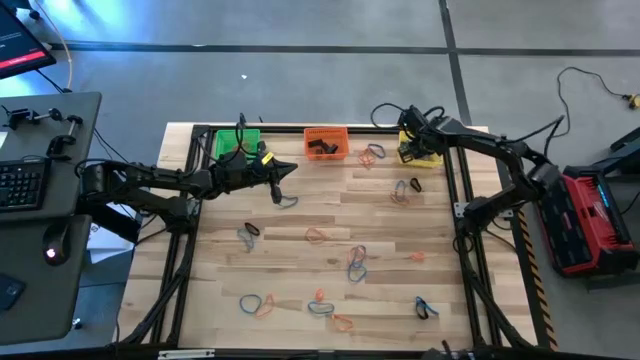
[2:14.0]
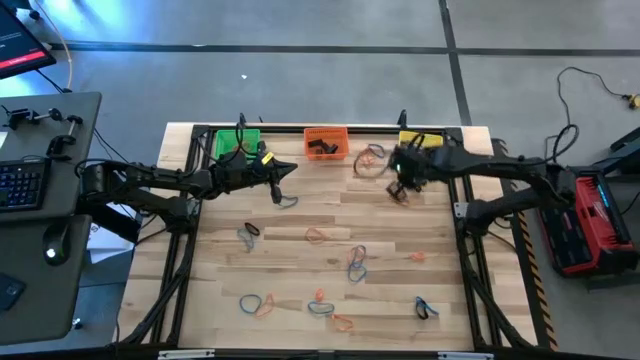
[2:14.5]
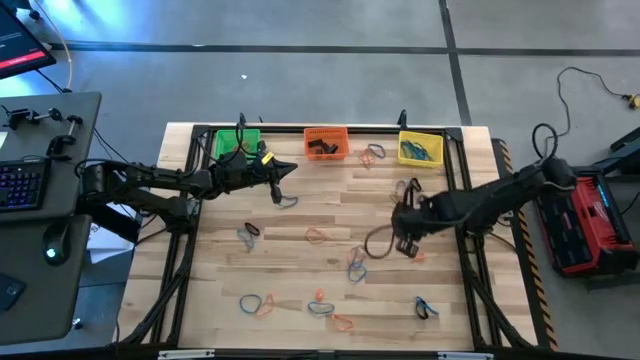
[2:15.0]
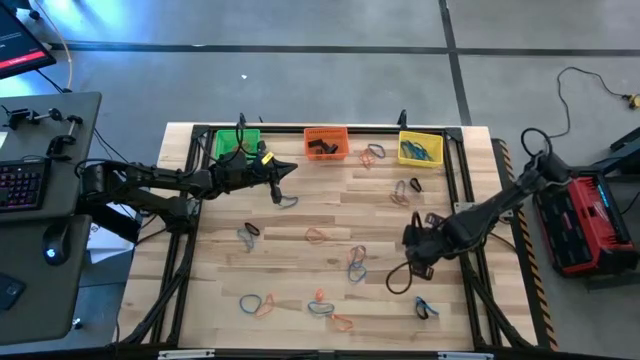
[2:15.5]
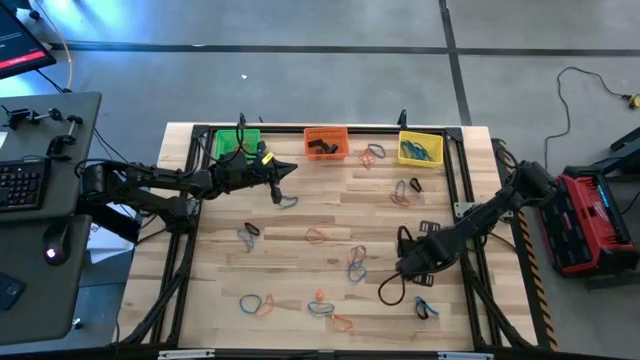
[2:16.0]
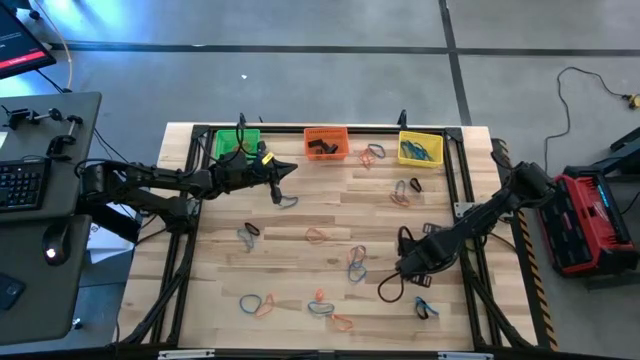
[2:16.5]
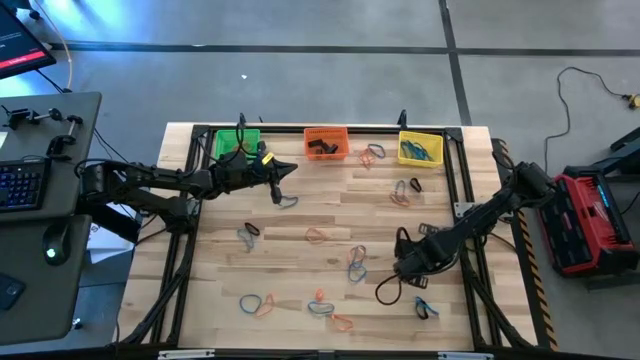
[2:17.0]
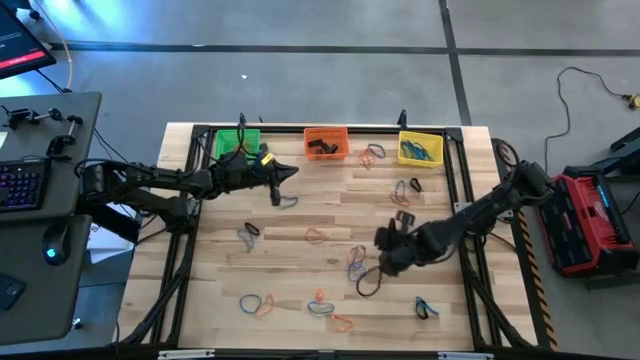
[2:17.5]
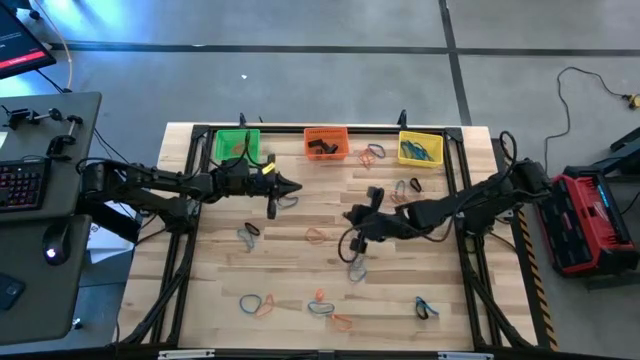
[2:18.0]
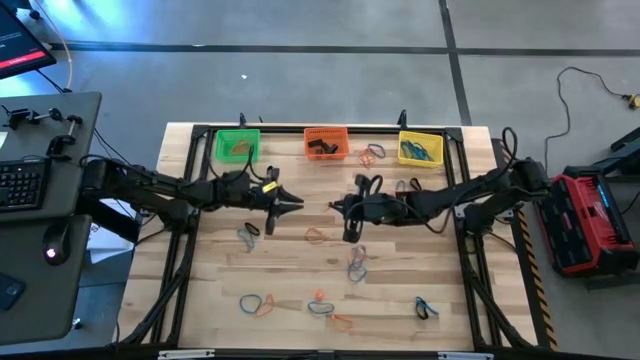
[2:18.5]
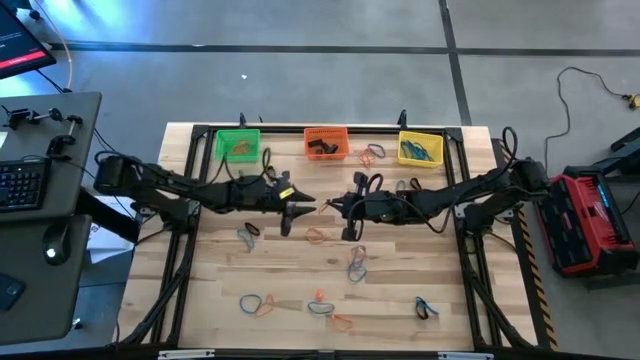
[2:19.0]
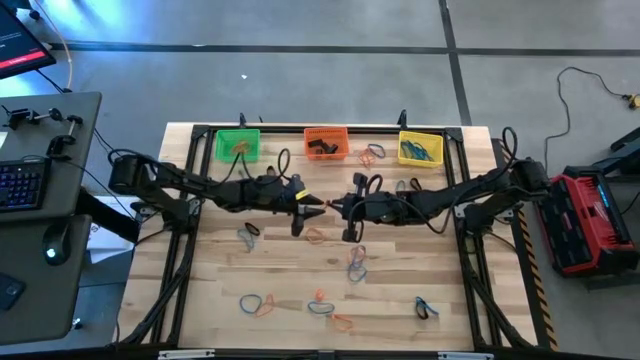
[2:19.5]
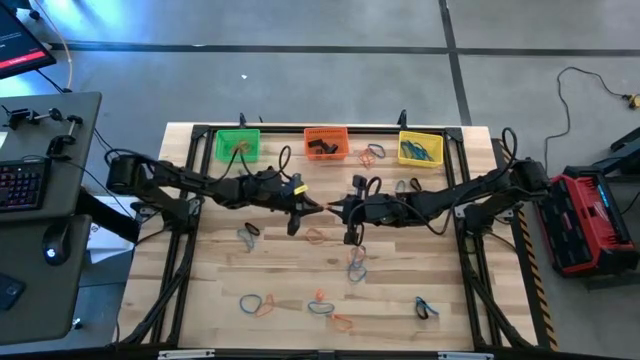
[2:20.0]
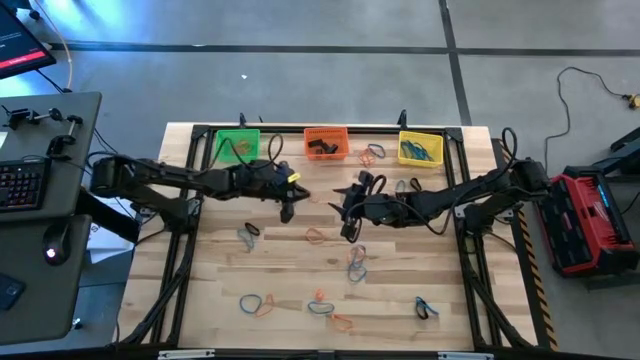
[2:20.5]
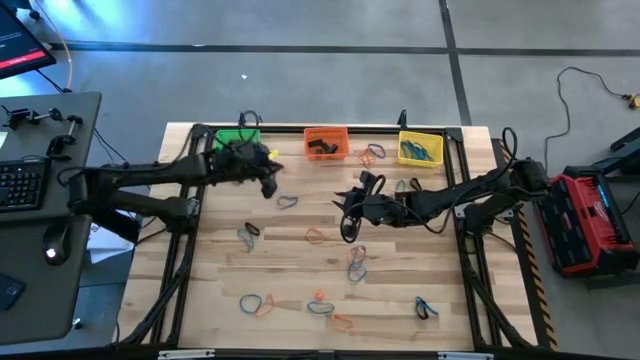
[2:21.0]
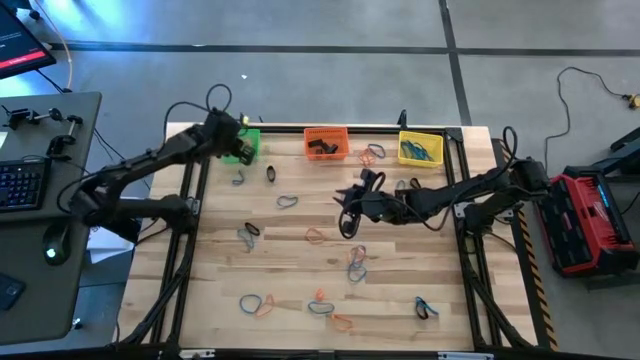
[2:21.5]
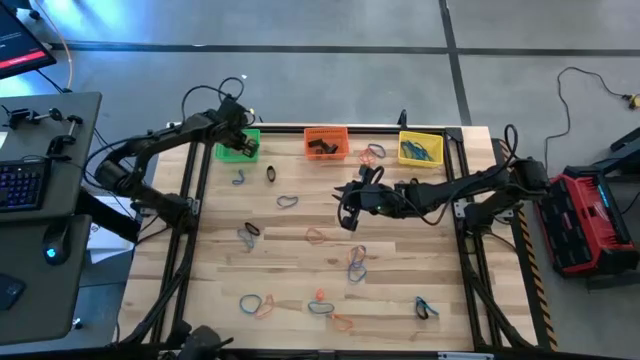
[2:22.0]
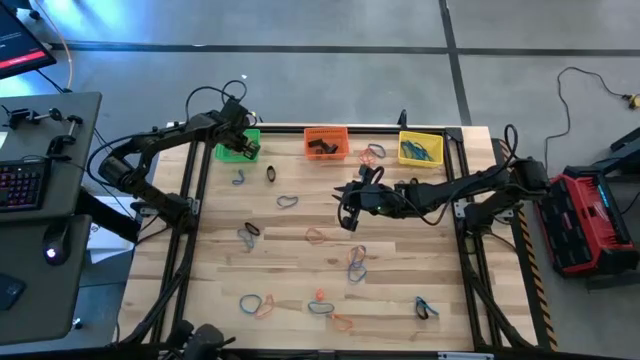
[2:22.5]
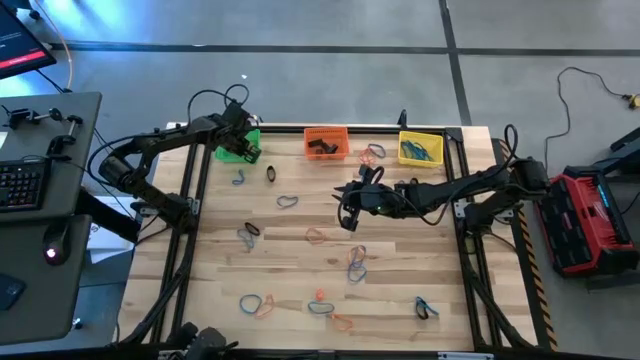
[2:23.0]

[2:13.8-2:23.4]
Task: Sort rubber bands into baskets
Put the orange rubber band into the green bin

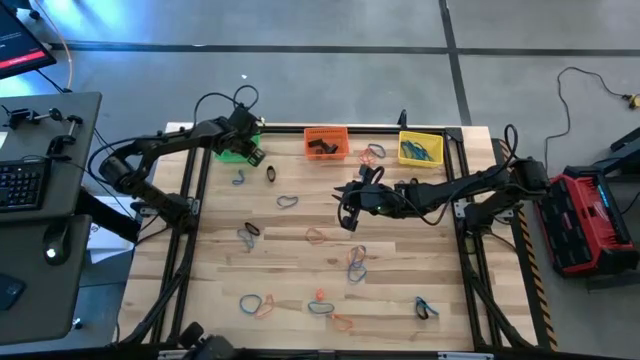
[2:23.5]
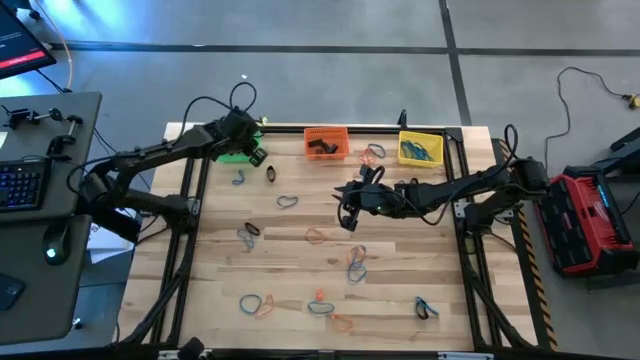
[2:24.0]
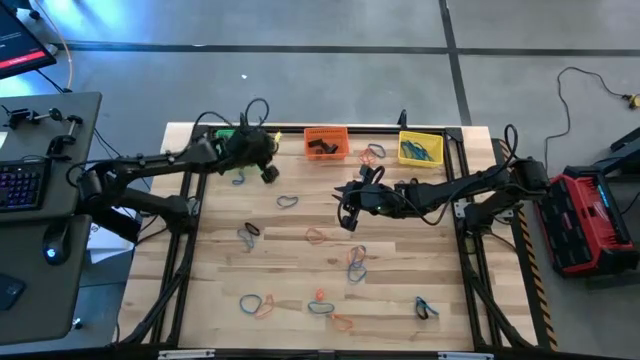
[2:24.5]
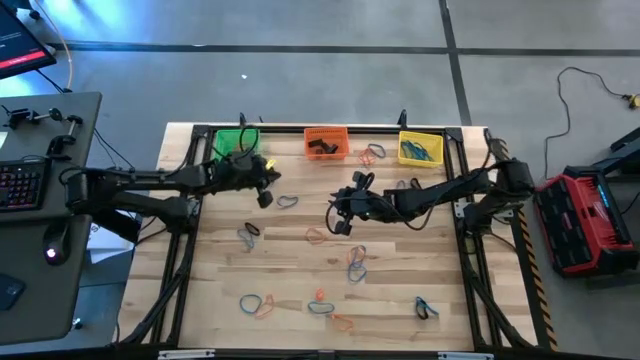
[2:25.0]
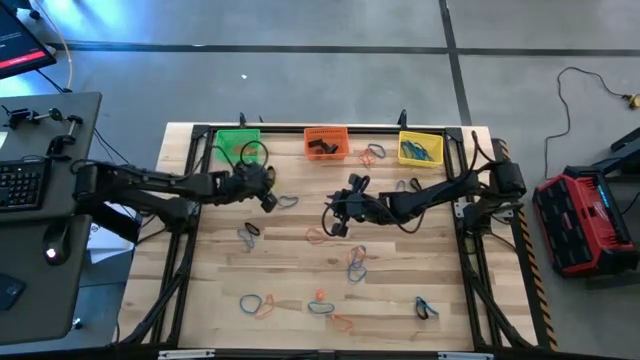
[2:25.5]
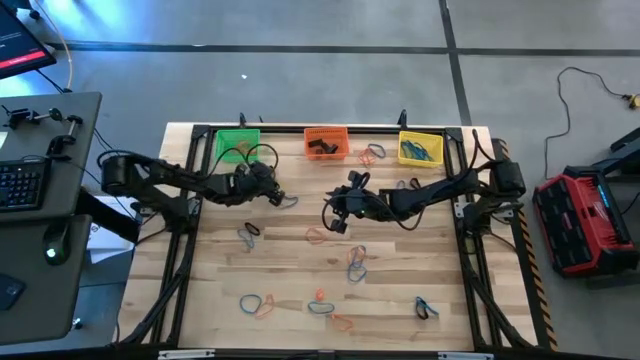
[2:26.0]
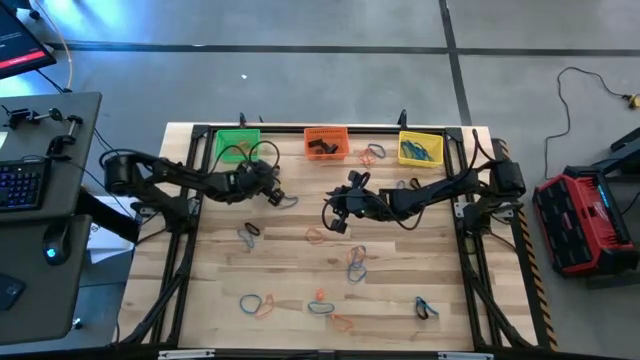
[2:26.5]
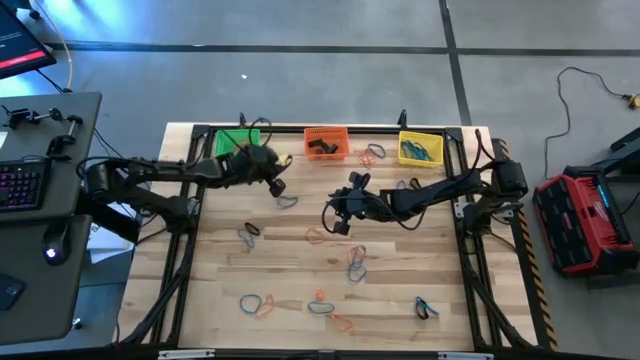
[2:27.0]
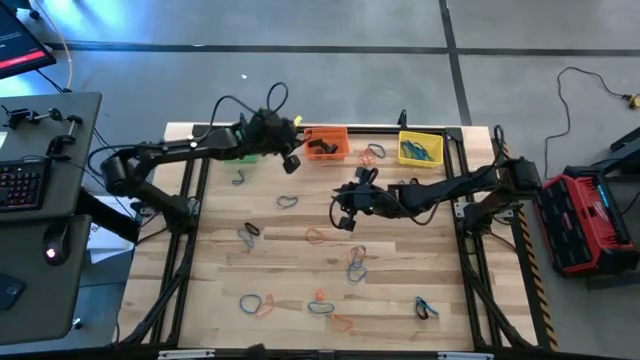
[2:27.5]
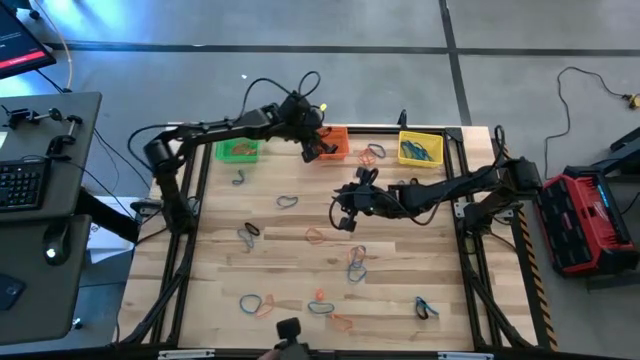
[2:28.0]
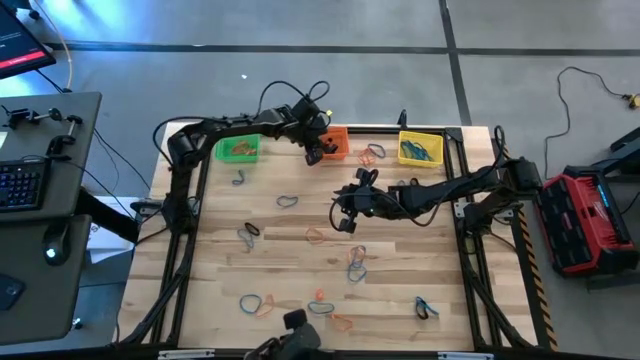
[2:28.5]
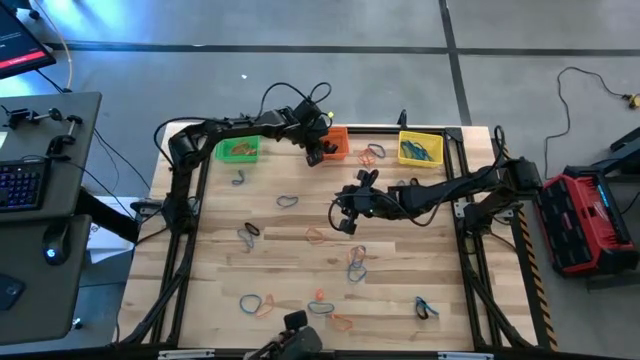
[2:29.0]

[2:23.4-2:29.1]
Put the black rubber band into the orange bin

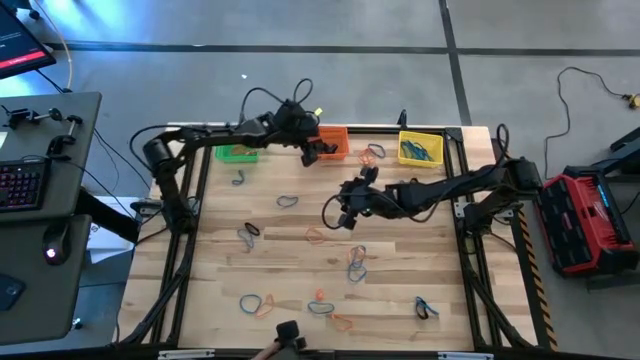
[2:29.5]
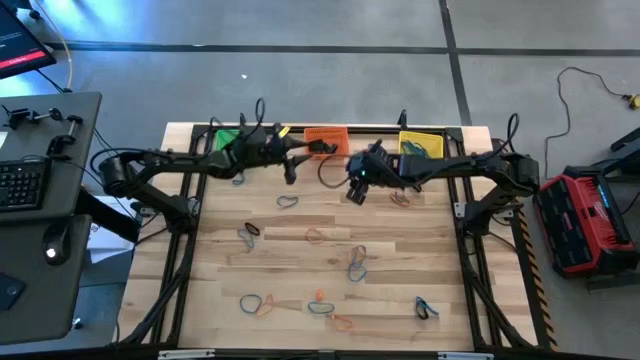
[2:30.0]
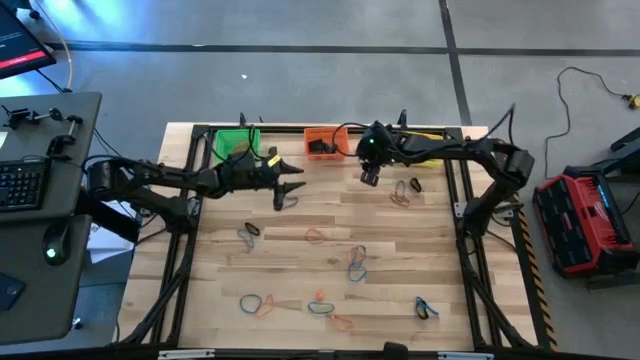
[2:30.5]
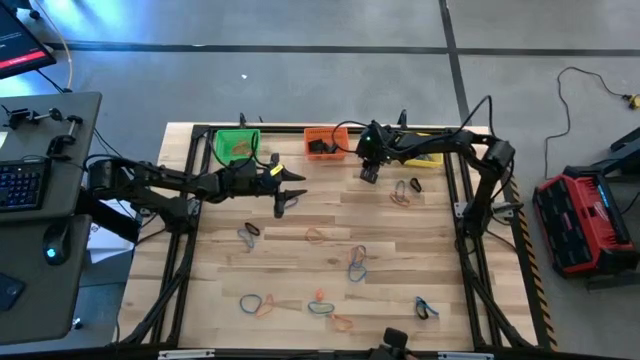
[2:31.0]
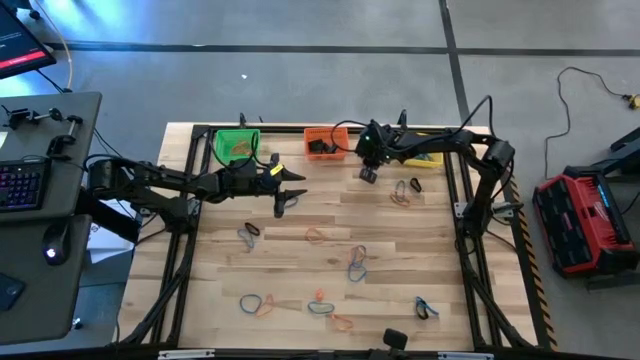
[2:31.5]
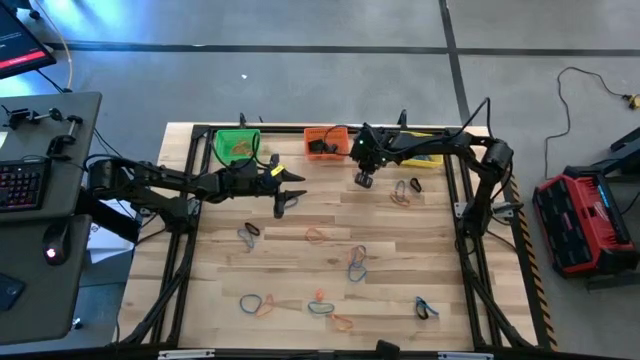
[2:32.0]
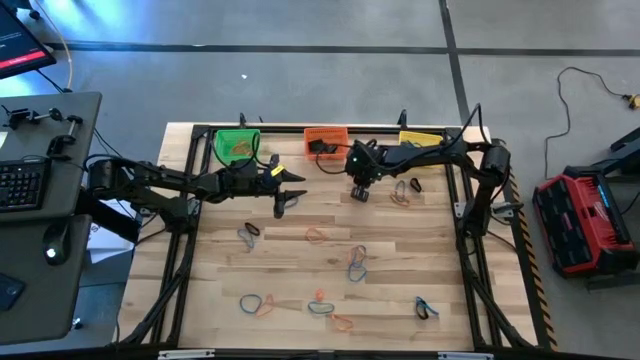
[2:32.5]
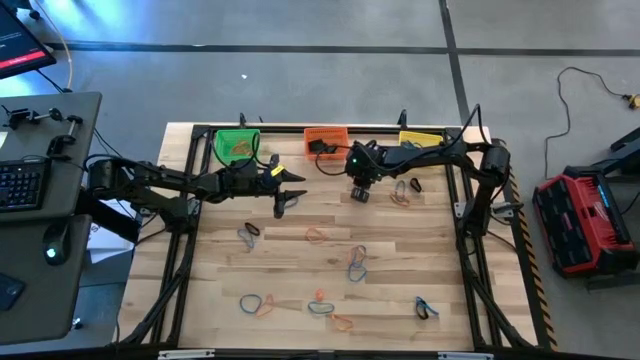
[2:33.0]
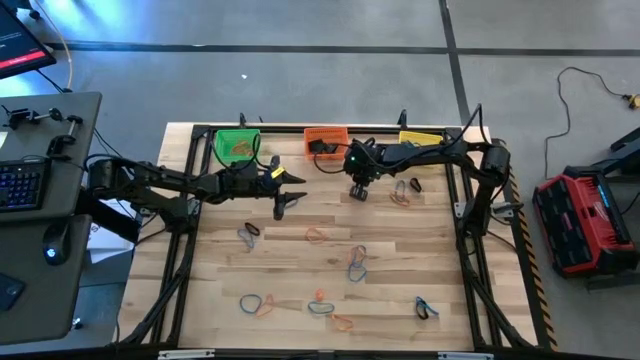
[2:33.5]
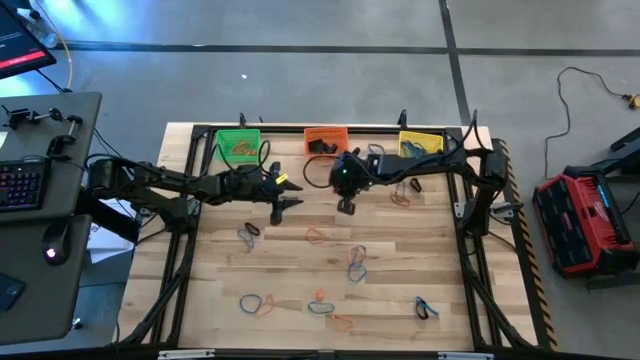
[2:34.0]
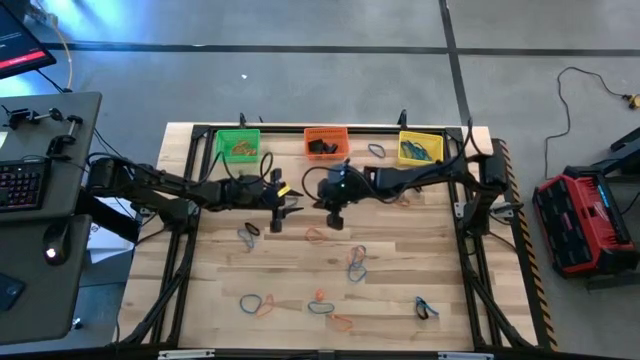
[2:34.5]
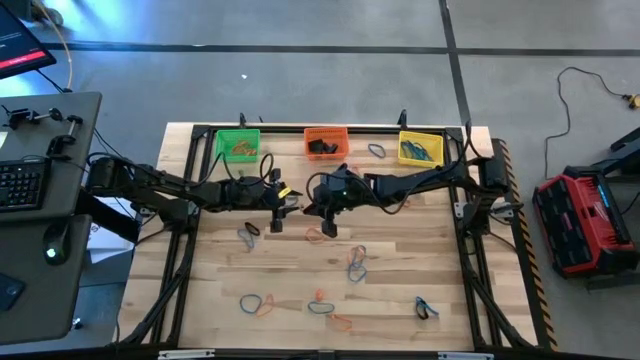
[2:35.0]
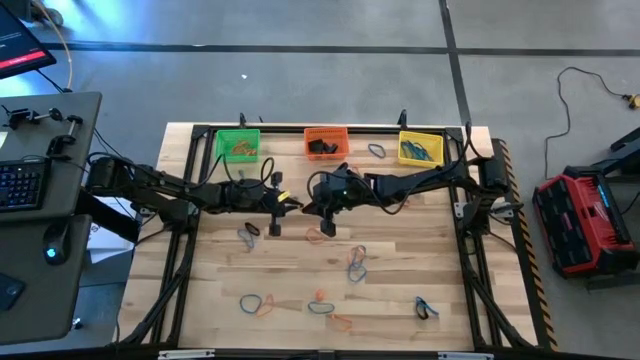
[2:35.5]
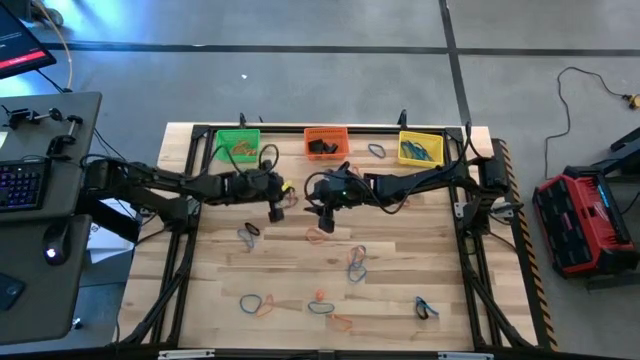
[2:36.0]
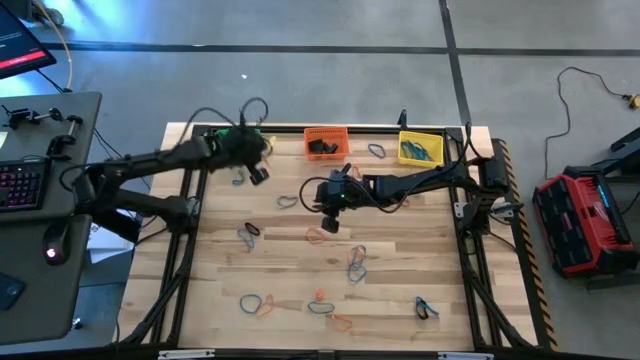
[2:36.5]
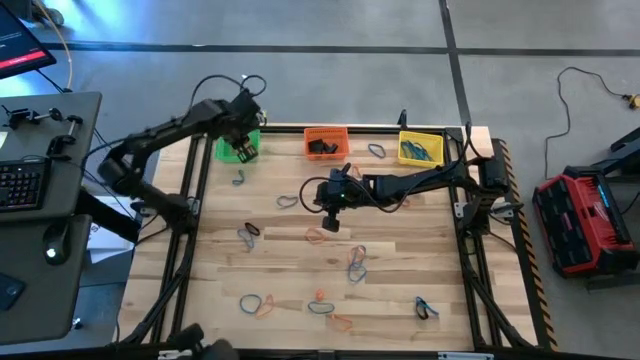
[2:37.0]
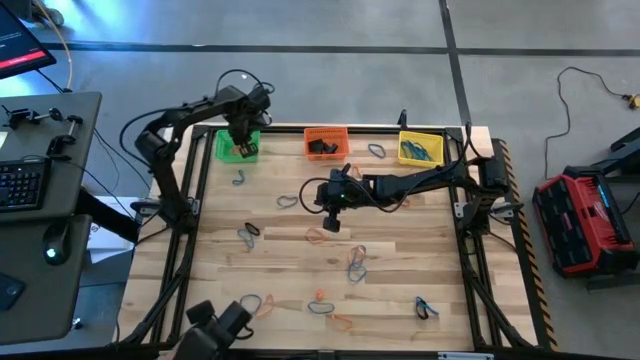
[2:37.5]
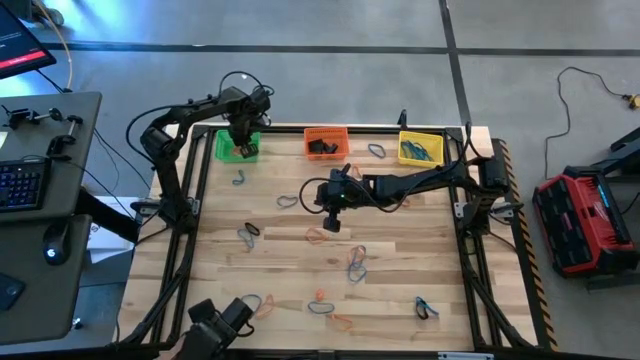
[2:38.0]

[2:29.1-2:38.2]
Put the orange rubber band into the green bin
